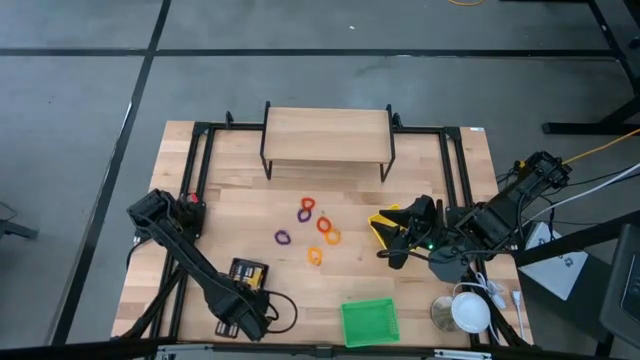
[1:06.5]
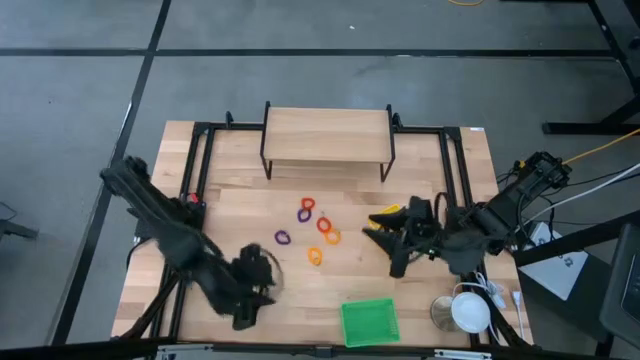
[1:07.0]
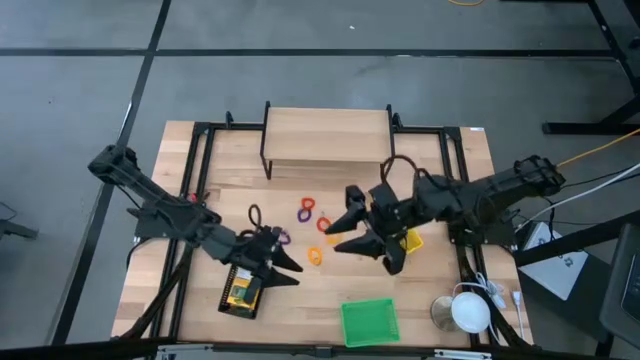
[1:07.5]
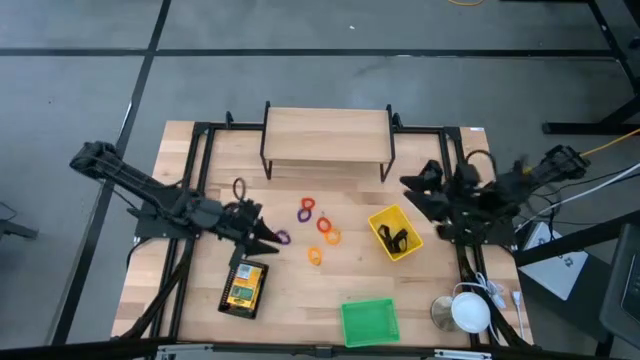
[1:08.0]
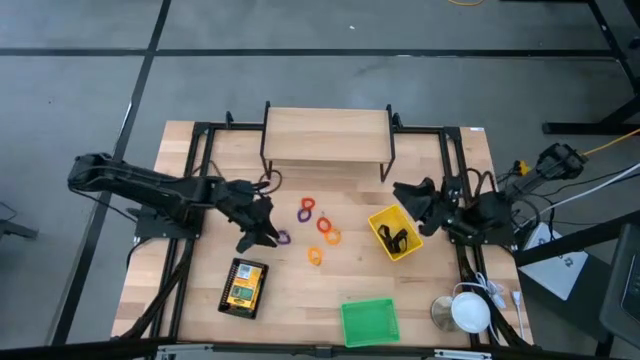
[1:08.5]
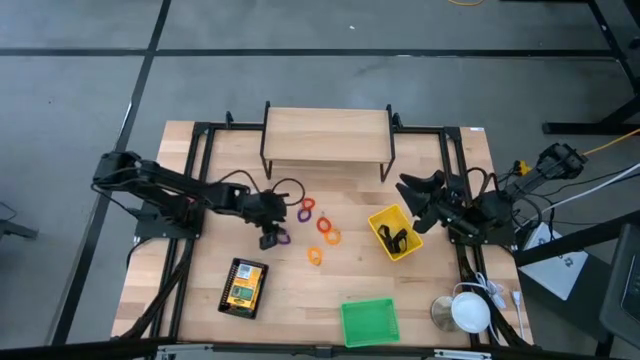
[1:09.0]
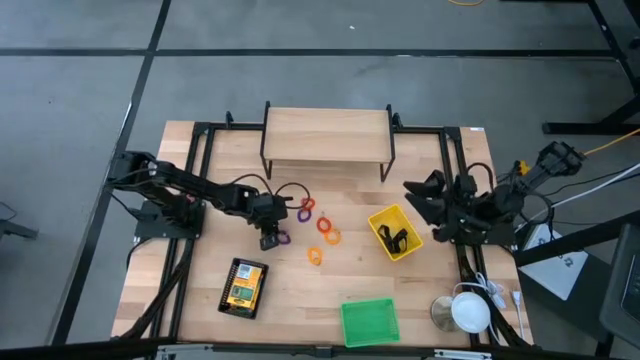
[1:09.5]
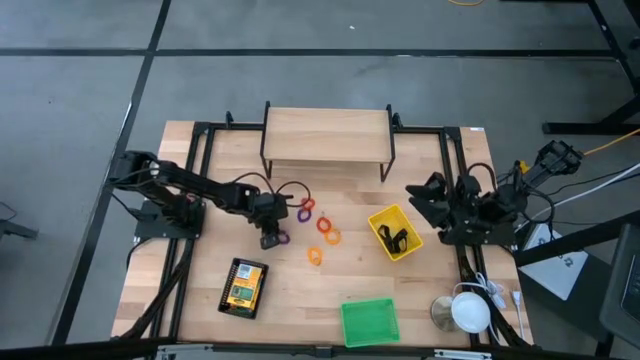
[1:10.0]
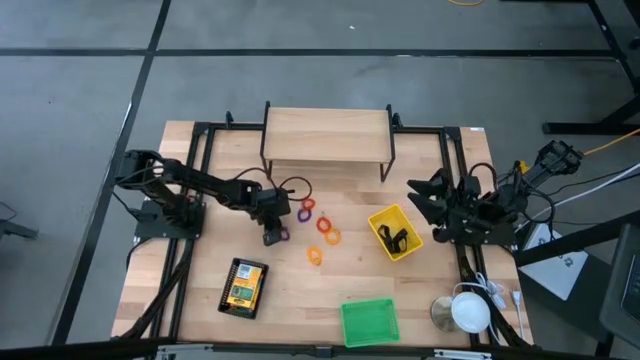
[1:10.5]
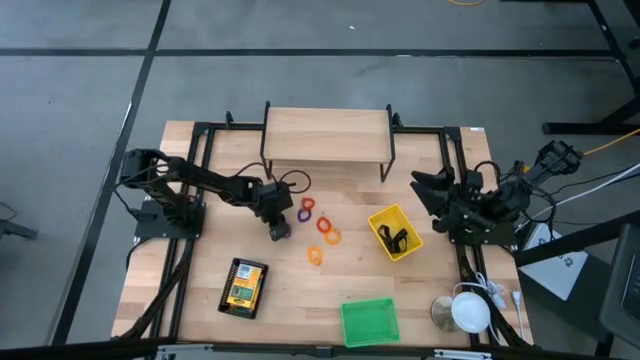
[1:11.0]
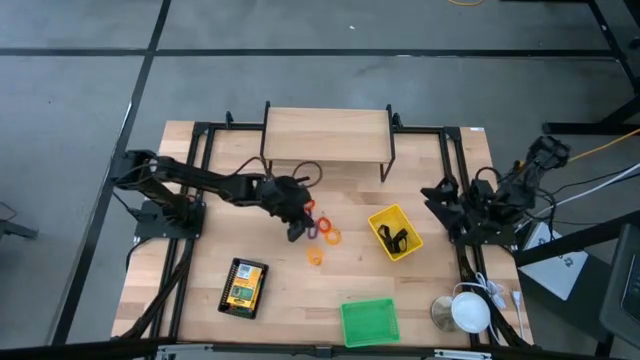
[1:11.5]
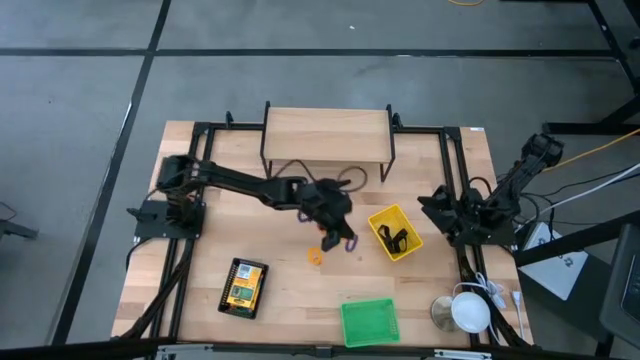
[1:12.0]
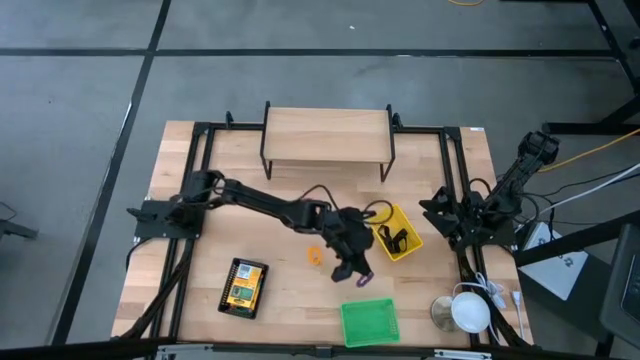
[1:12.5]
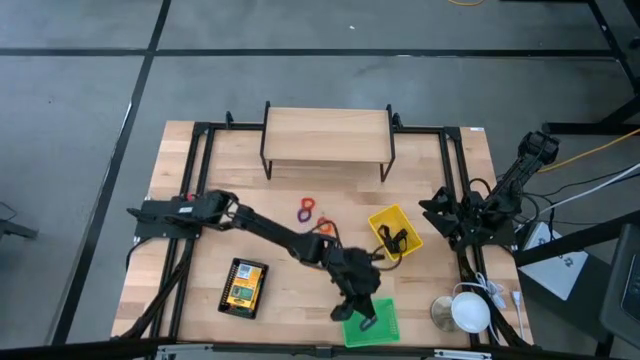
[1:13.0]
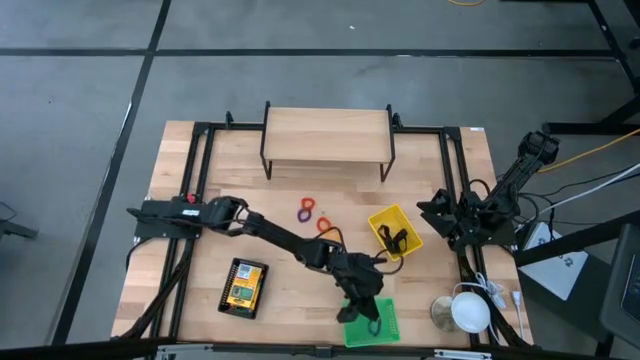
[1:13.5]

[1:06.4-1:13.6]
Task: Pick & Place Office Desk Supplies
Put the purple spring keychain into the green basket

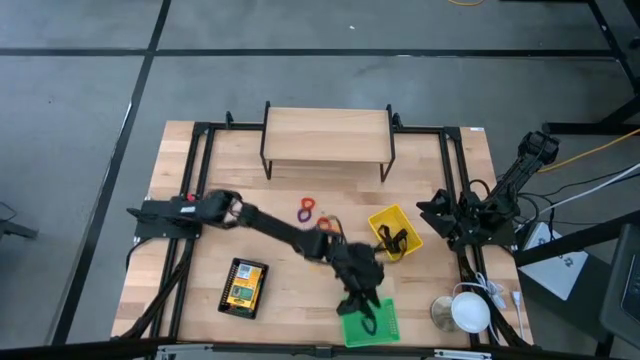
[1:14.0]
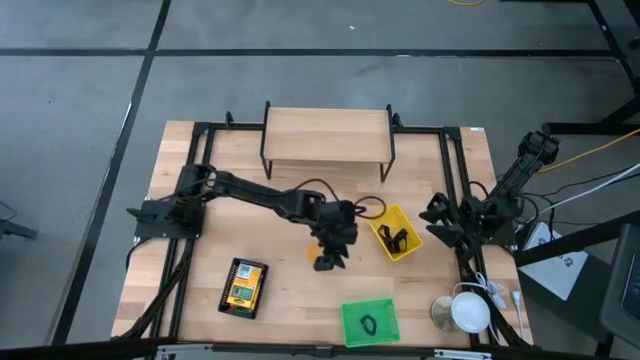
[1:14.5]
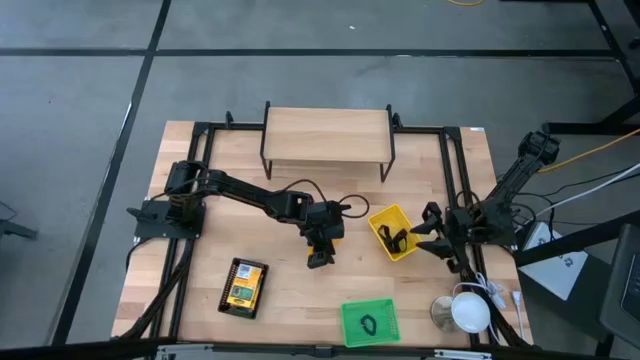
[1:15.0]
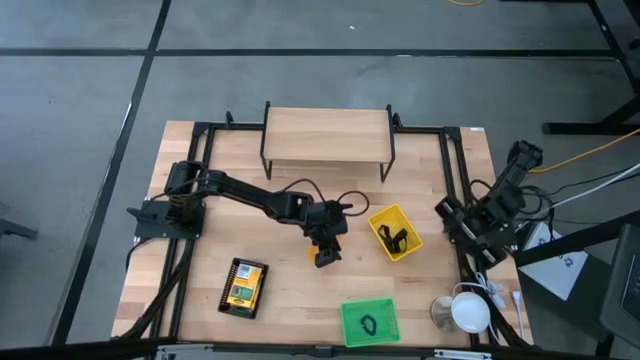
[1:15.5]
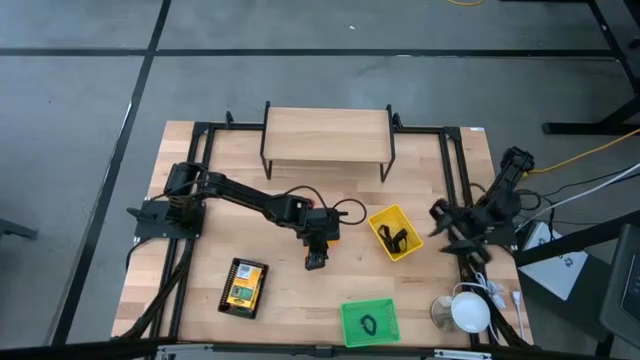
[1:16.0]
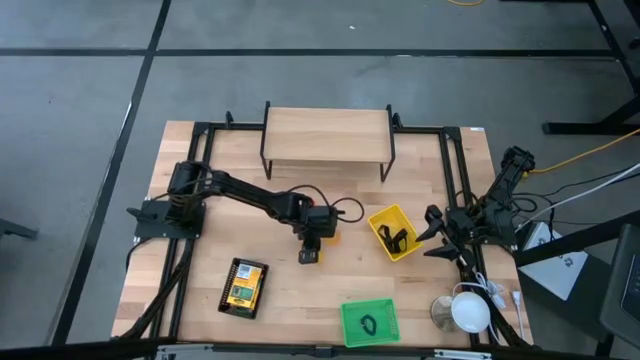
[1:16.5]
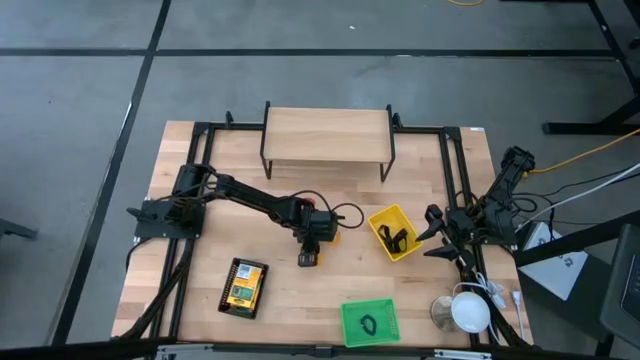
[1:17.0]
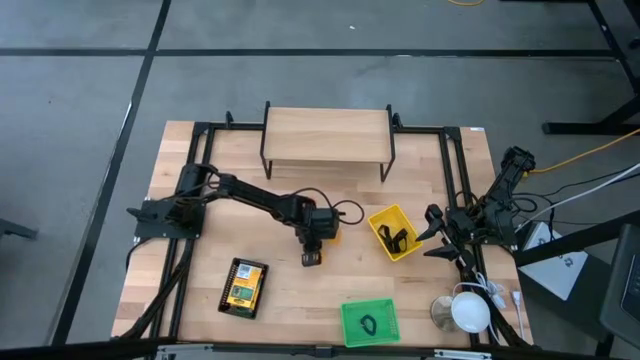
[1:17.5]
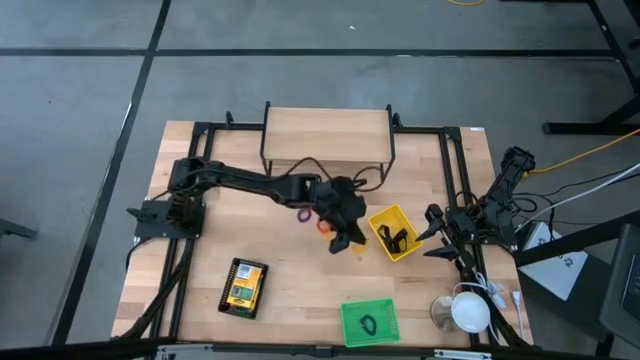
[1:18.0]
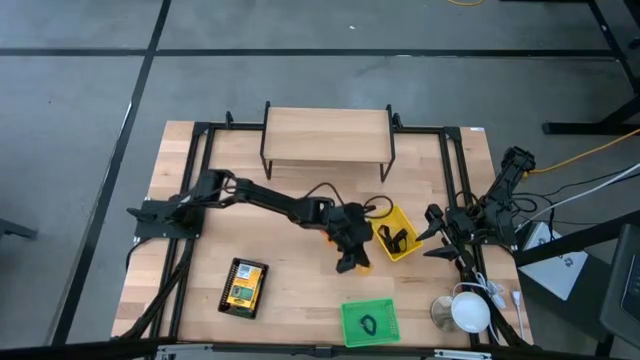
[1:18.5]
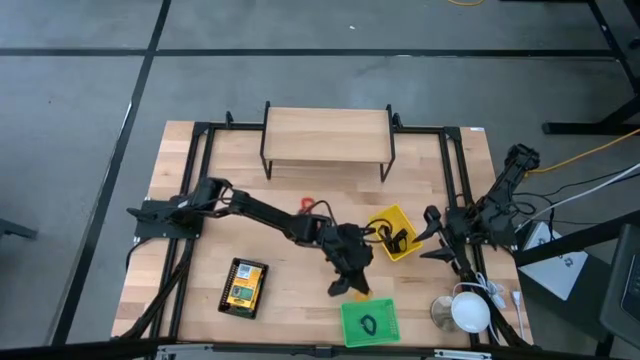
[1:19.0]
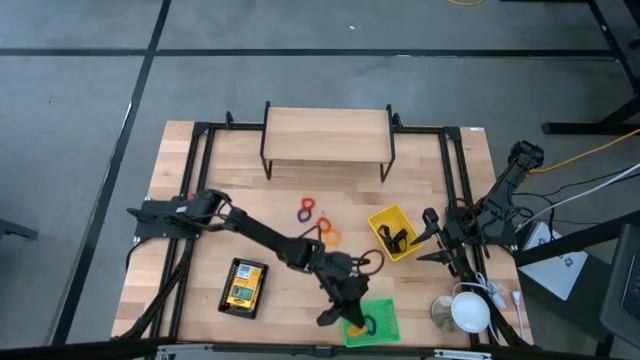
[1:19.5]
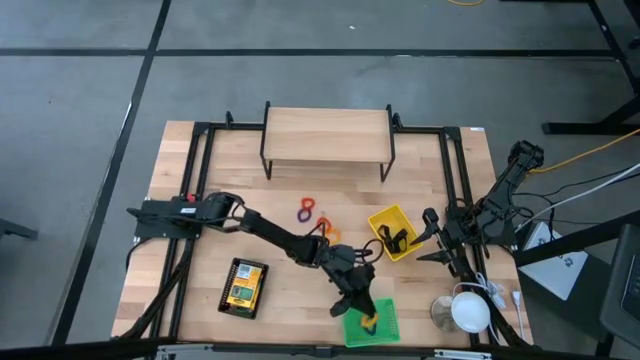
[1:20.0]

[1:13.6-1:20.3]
Put the yellow spring keychain into the green basket

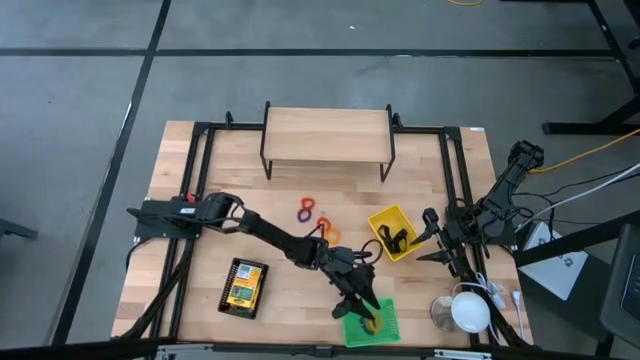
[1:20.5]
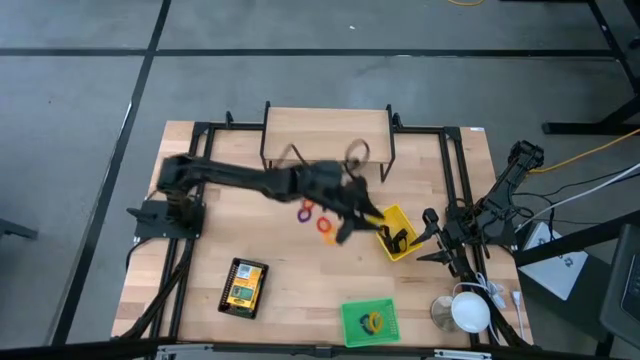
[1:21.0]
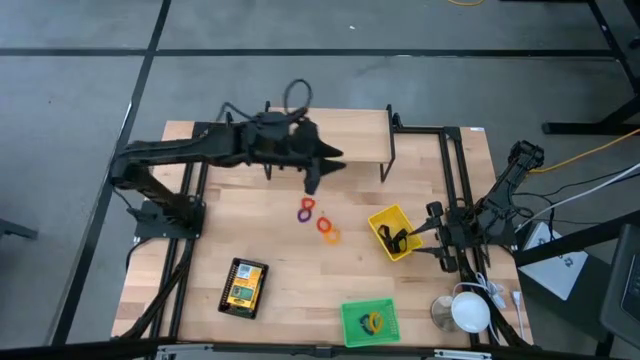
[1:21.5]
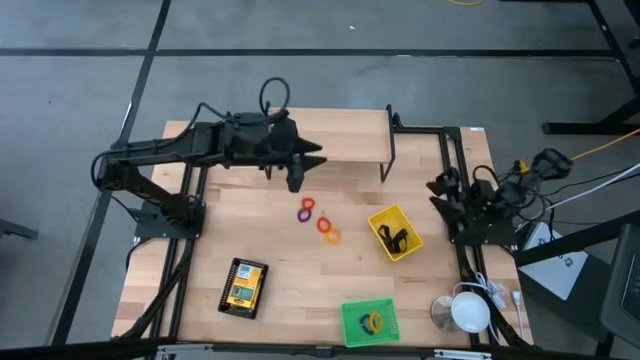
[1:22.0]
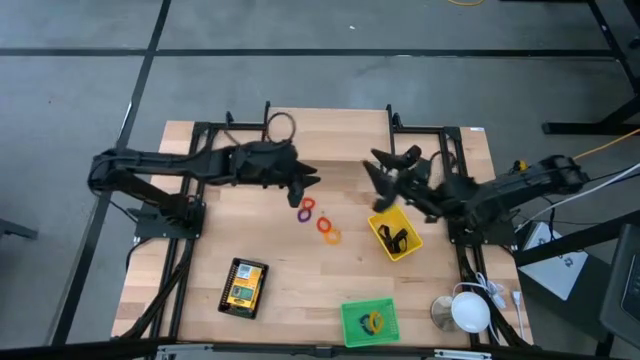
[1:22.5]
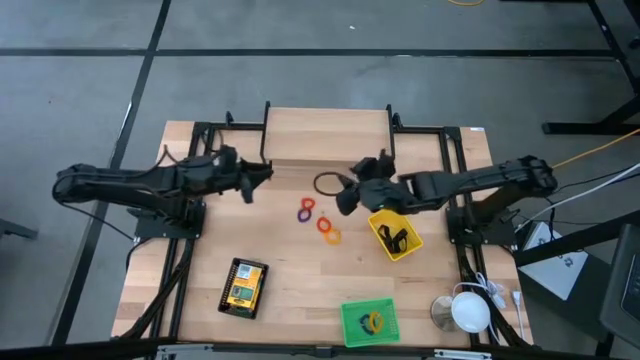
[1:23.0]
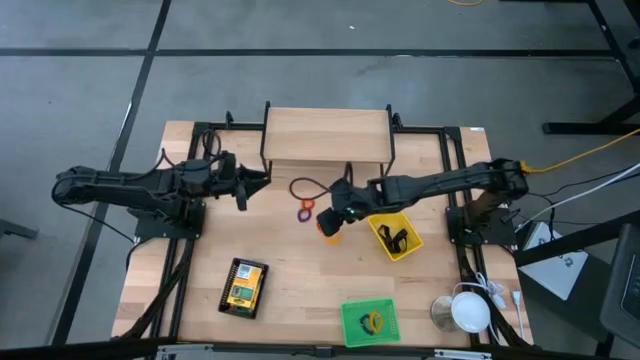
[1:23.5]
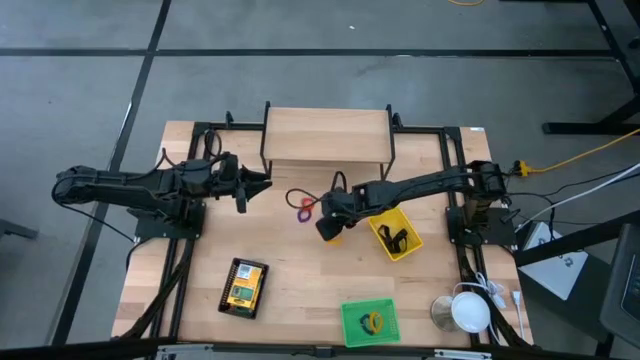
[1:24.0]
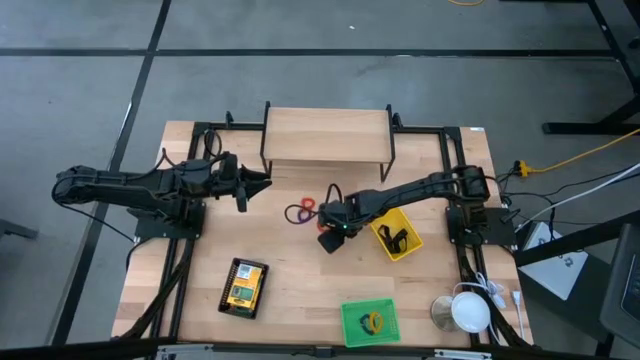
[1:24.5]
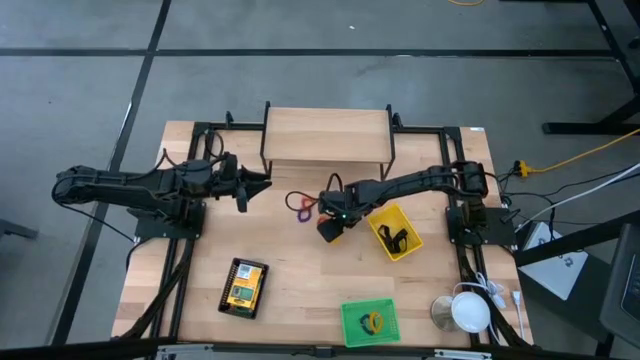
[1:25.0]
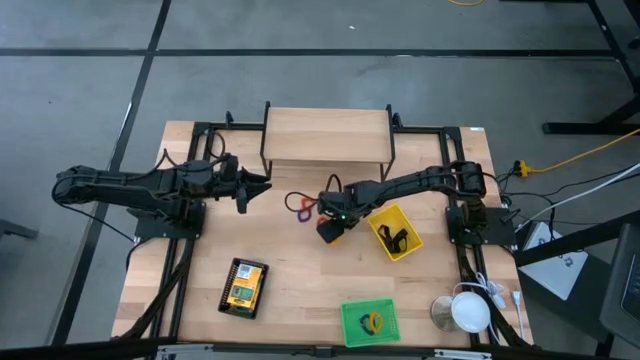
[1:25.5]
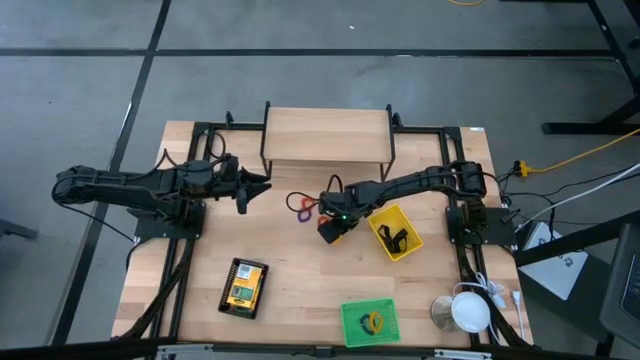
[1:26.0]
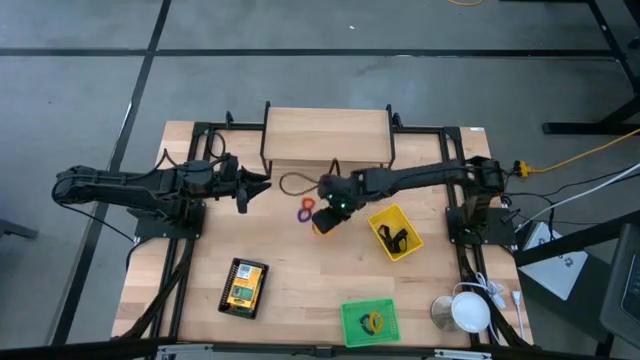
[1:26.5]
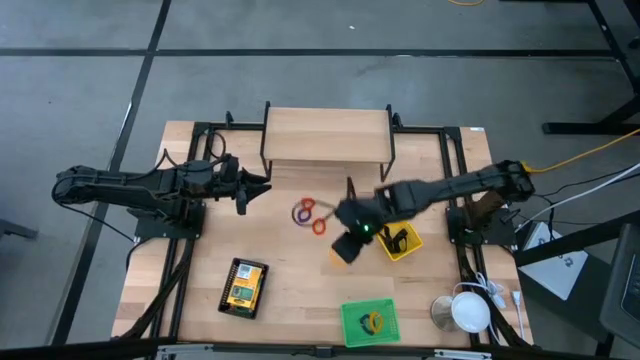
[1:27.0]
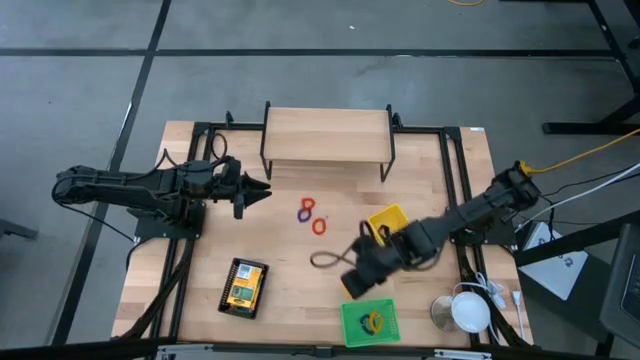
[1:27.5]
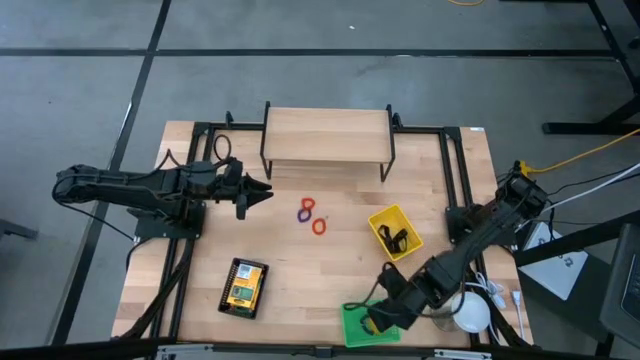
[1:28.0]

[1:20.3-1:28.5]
Put the yellow spring keychain into the green basket

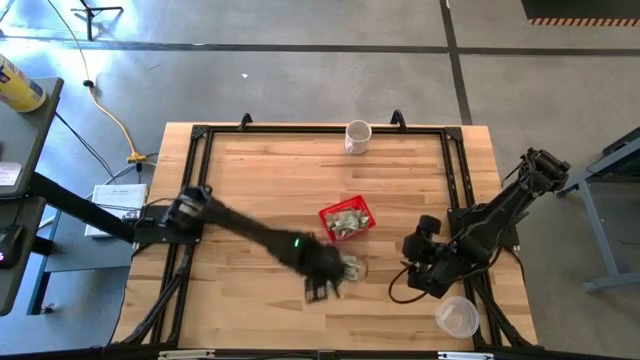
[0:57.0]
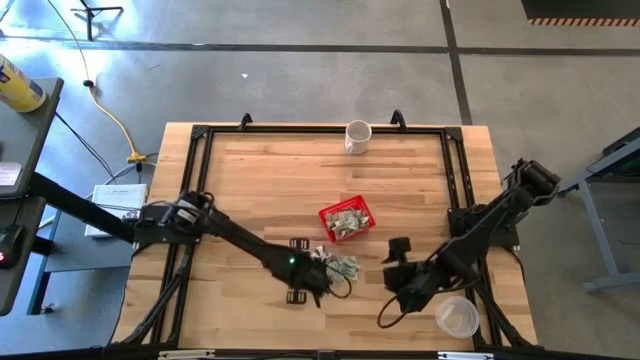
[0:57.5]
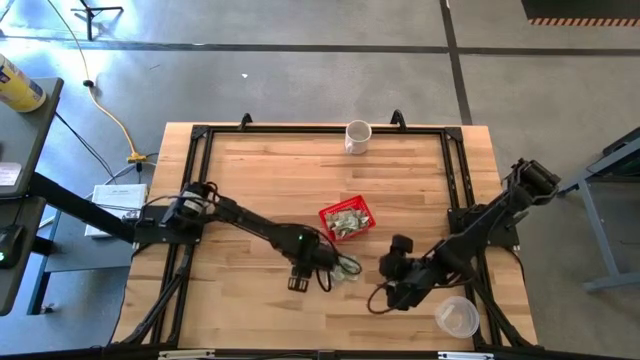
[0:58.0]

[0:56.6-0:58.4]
Task: Pick and place items into bin
Put the white stevia packet into the red bin
